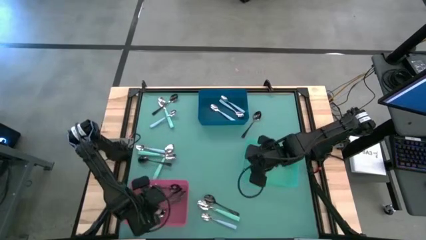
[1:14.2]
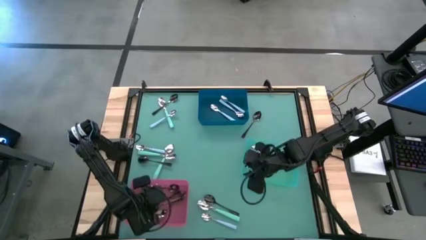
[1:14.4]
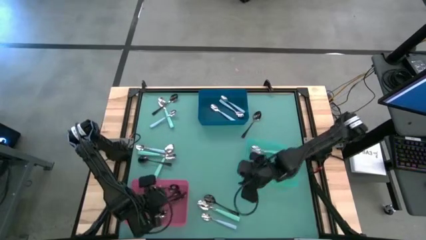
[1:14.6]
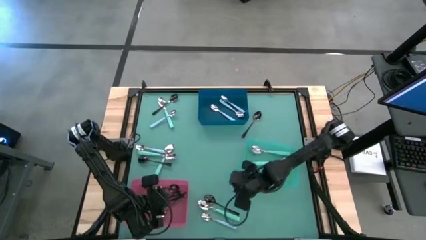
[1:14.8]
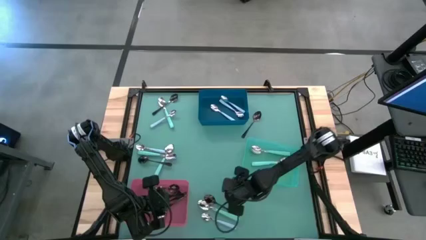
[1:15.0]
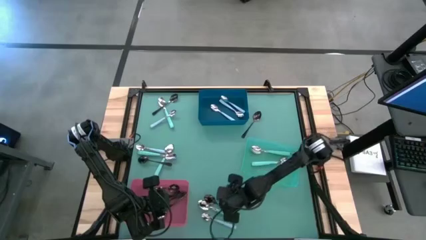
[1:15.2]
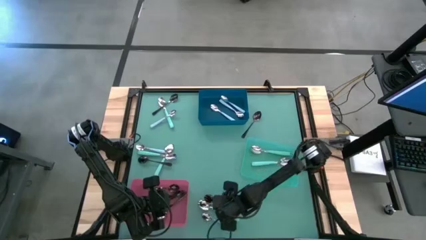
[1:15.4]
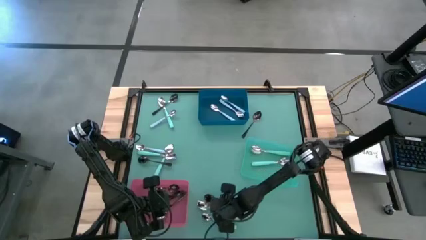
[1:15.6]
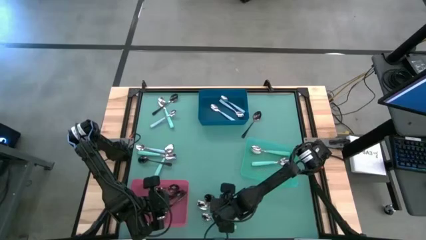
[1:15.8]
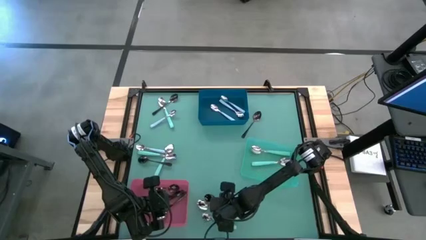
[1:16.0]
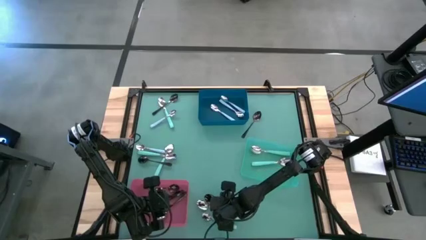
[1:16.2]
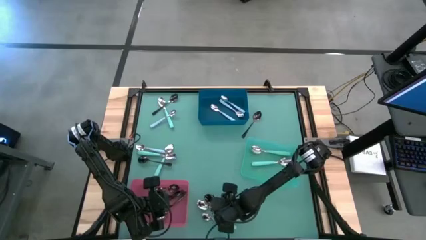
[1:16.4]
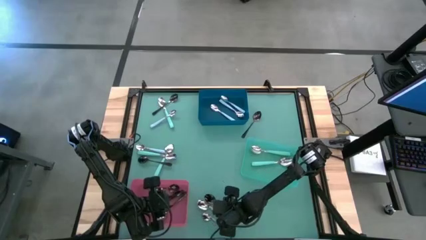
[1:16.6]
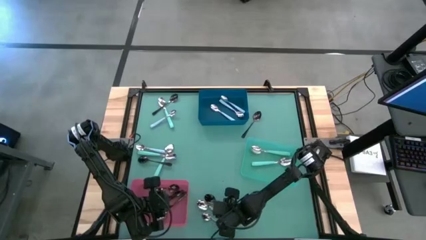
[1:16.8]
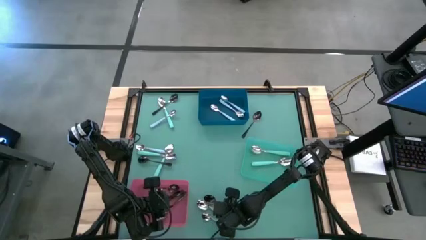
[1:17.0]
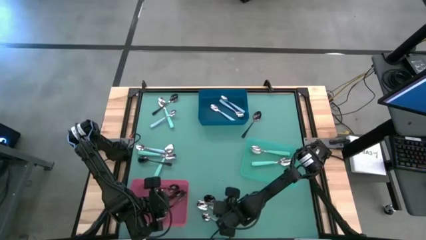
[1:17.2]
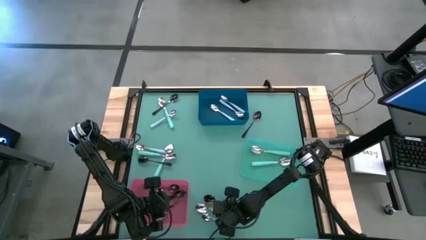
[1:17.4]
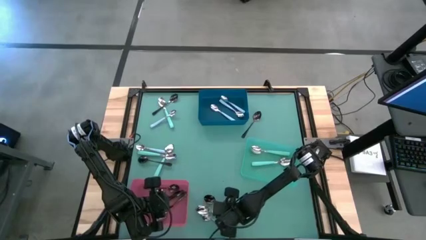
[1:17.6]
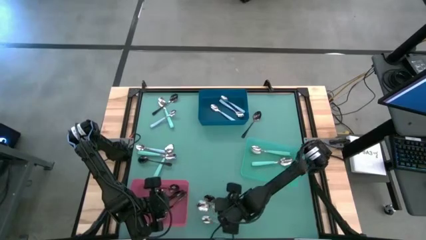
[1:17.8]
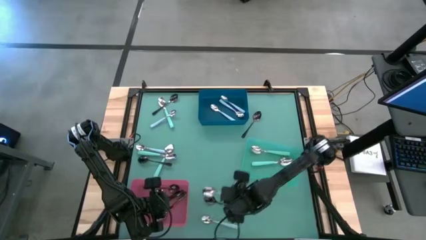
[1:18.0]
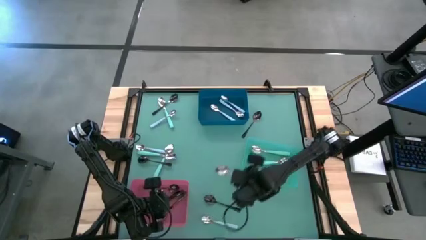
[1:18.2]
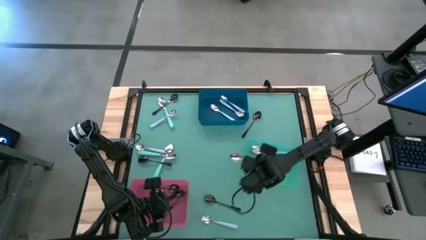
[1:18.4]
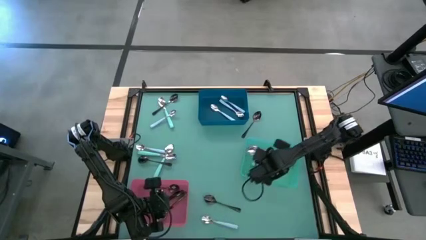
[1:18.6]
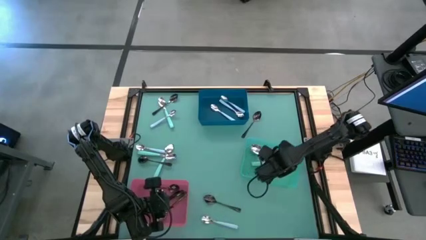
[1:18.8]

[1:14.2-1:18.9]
Task: Sort silverware by color (type)
Put the green spoon into the green bin

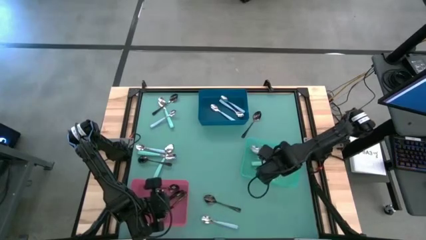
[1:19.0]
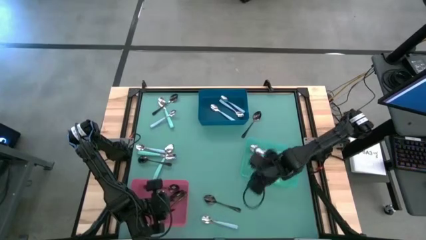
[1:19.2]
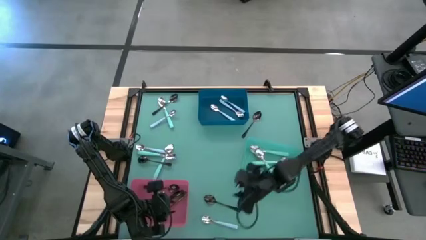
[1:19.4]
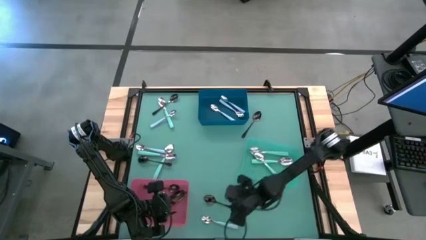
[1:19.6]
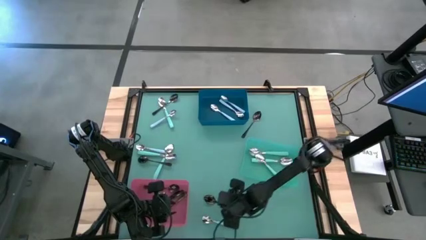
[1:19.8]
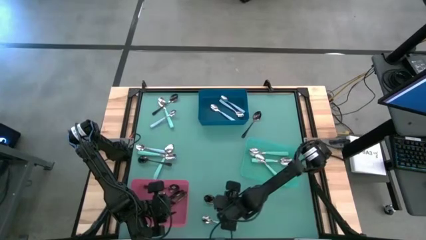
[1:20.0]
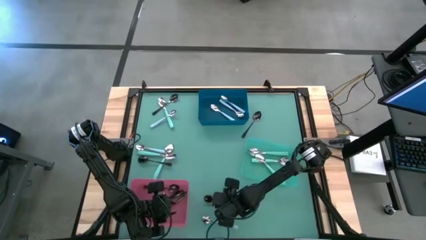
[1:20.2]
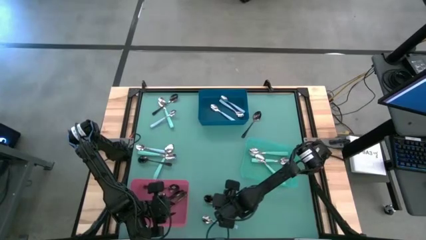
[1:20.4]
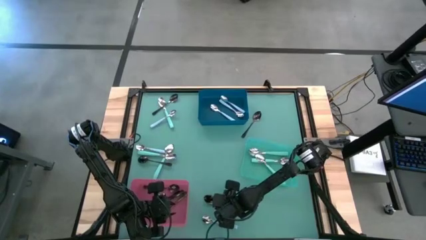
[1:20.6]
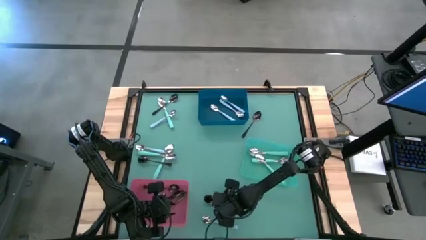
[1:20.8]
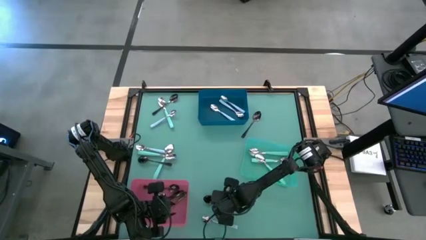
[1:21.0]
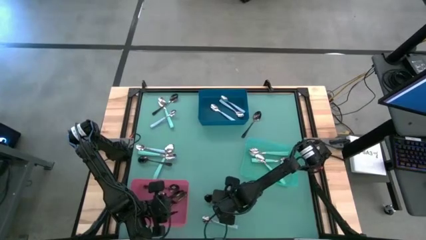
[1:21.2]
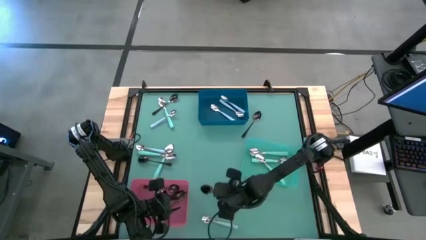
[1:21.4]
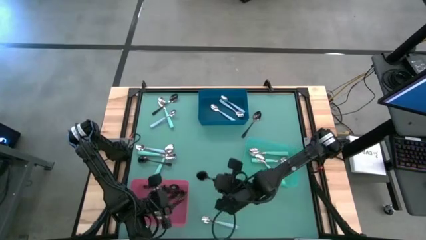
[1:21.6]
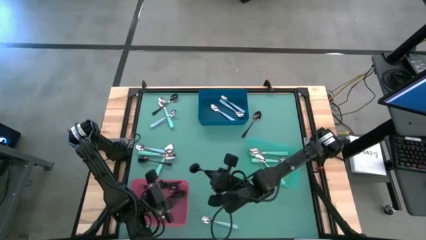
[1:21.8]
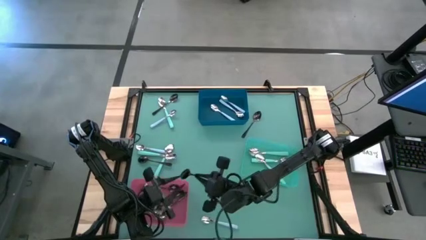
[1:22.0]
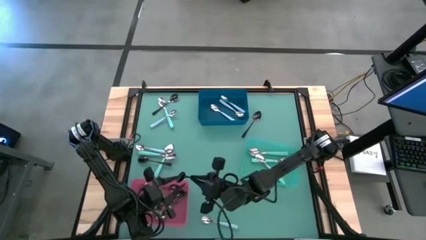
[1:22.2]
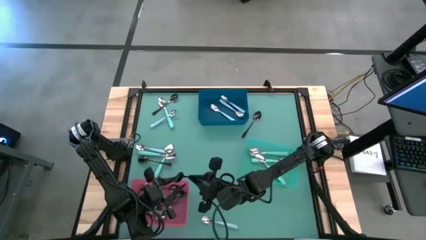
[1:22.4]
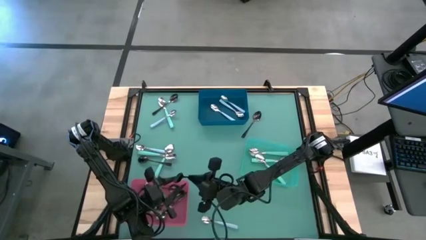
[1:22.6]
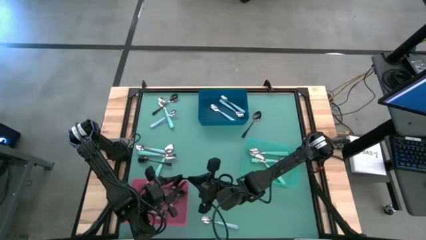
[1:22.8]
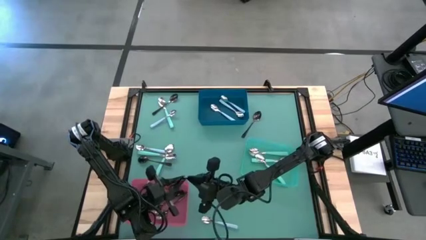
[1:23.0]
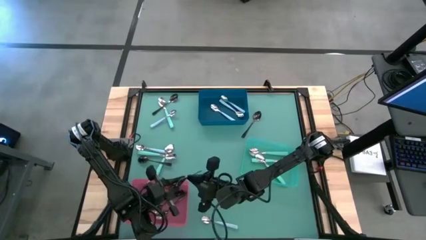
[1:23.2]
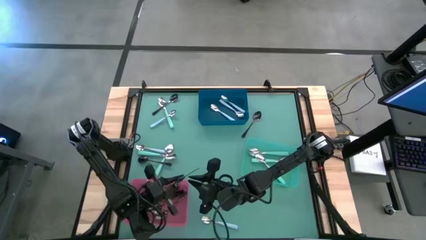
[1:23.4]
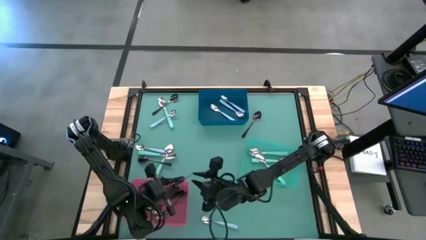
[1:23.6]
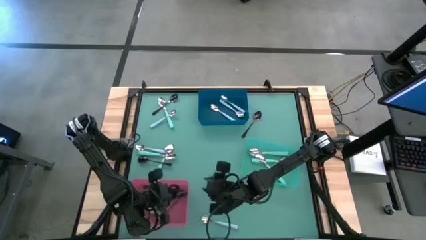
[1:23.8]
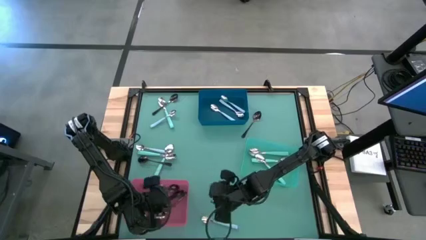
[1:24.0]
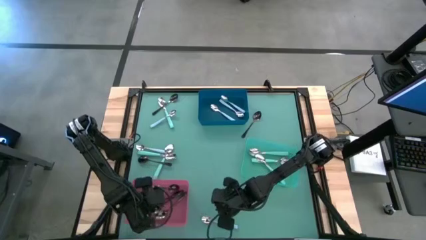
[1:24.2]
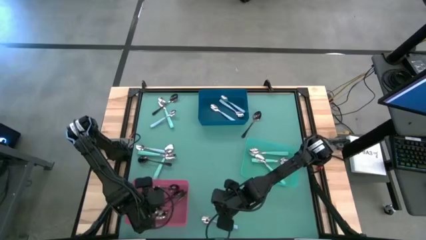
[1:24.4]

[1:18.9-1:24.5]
Put the black spoon into the red bin

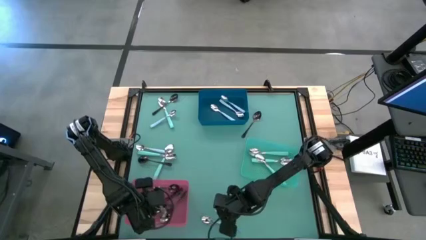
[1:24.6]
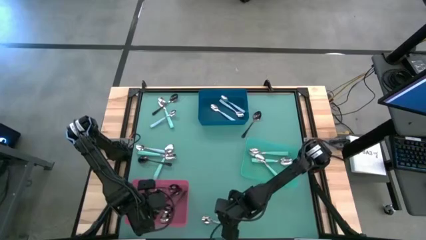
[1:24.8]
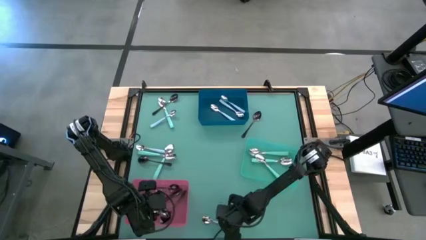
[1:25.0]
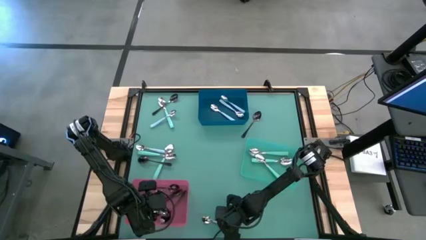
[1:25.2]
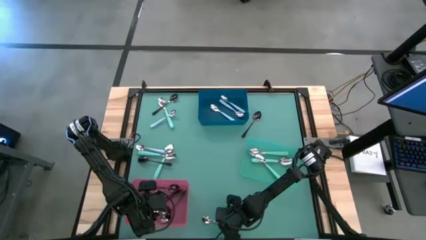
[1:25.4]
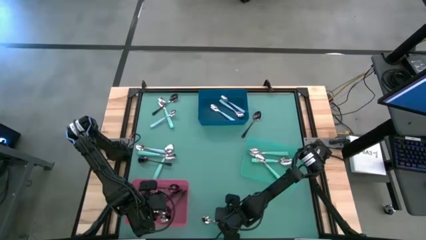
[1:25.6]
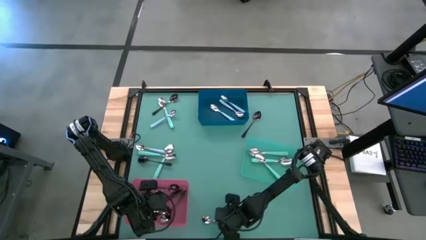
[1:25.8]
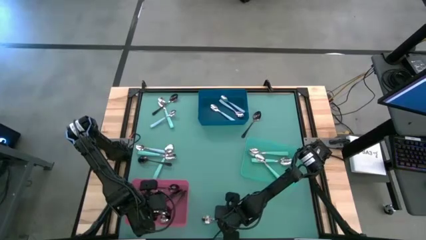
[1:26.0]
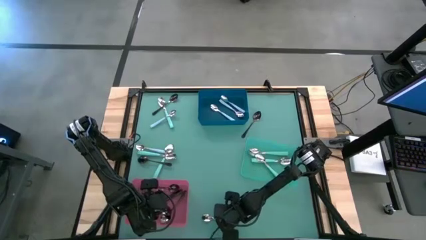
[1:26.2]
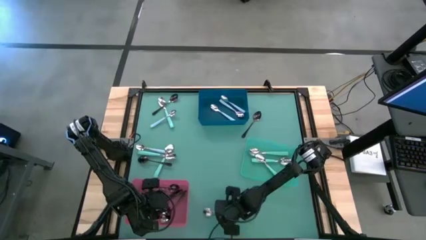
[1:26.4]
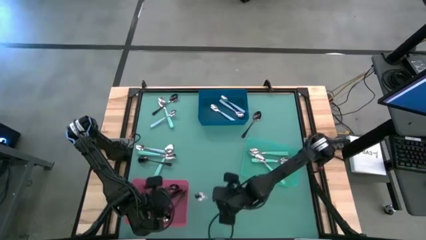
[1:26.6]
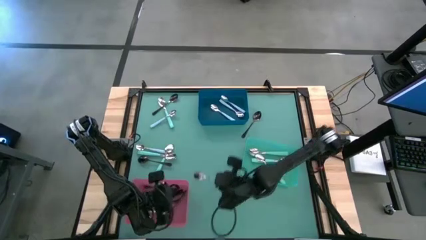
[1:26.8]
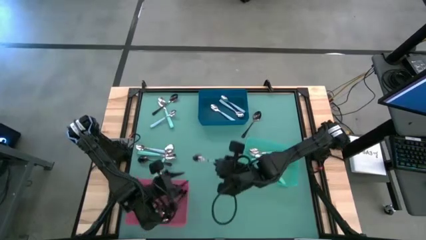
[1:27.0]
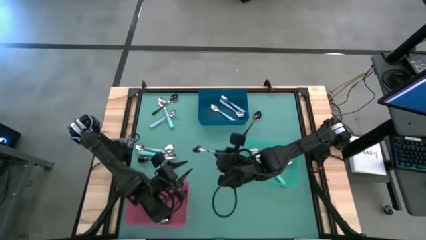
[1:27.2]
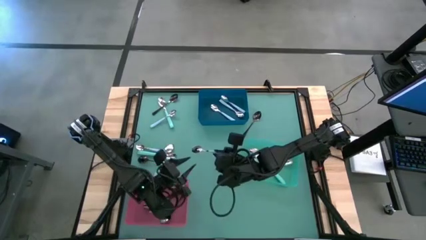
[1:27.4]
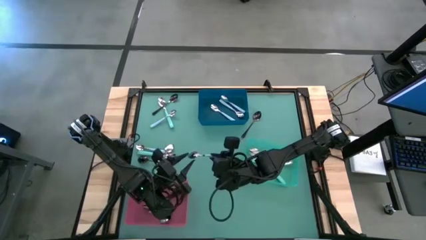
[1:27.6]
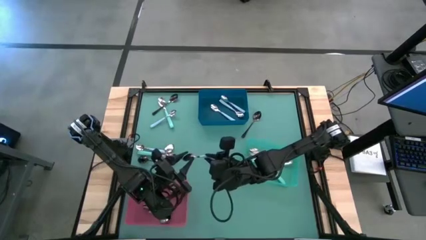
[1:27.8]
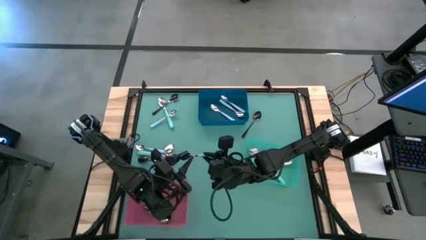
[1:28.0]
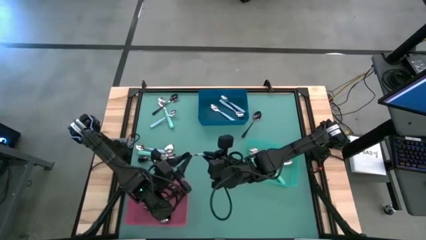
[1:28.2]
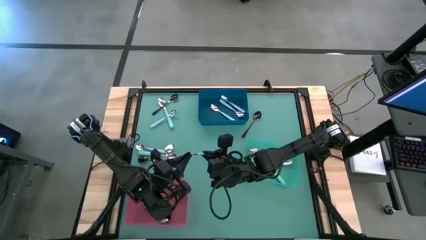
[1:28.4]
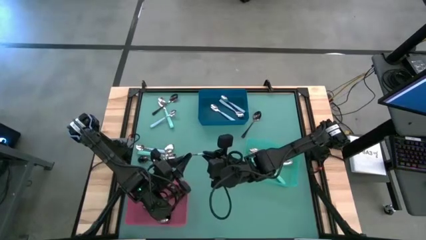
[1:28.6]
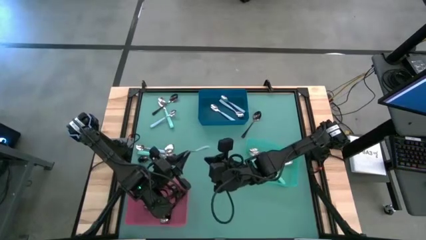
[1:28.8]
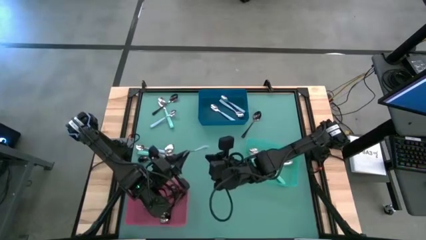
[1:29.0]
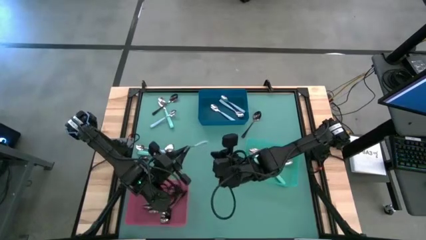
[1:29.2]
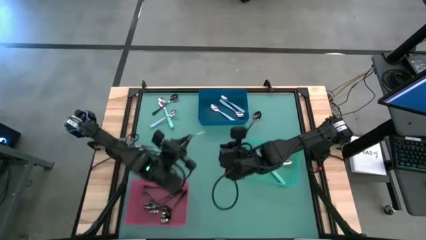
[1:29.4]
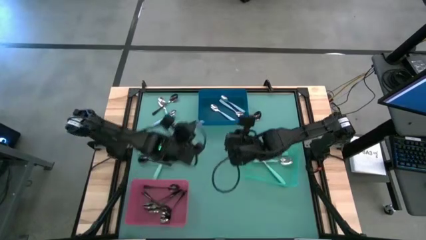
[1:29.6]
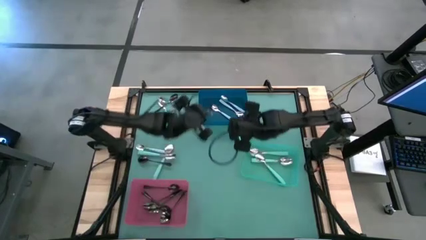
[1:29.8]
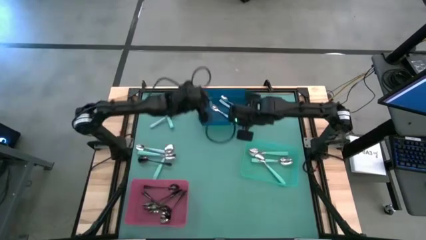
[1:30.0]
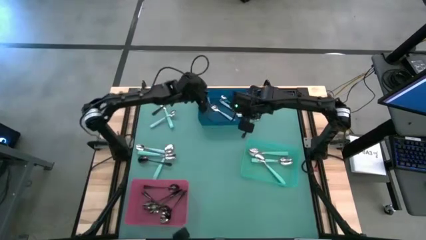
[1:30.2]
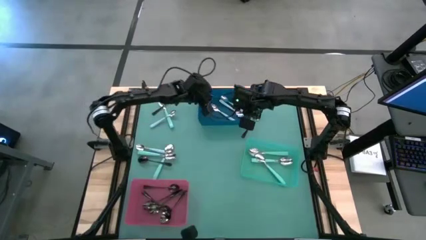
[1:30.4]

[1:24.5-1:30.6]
Put the blue spoon into the blue bin
